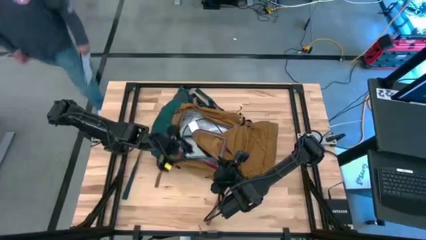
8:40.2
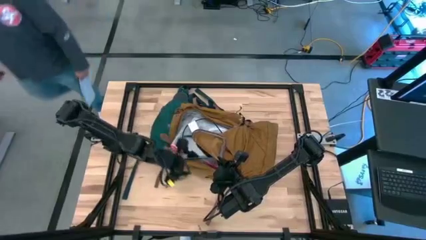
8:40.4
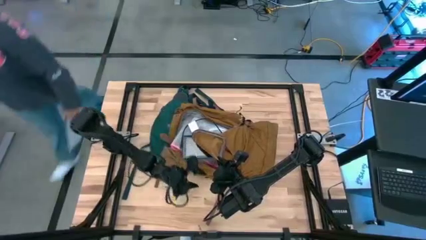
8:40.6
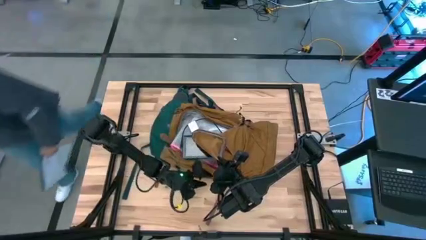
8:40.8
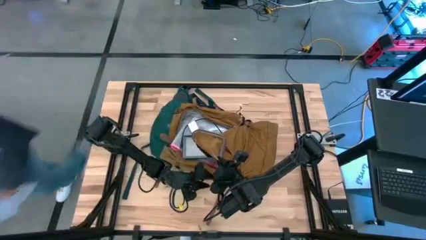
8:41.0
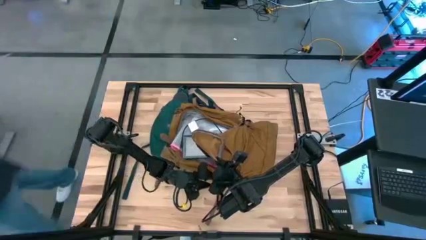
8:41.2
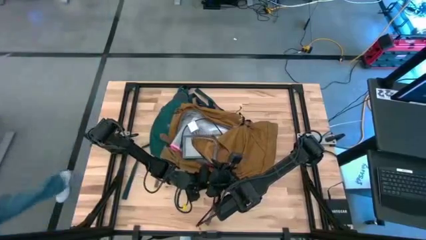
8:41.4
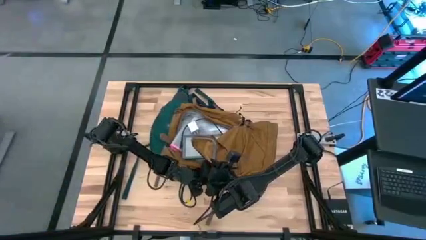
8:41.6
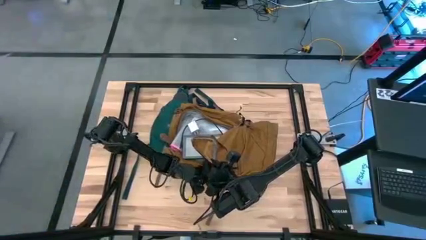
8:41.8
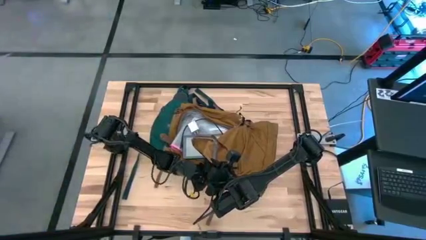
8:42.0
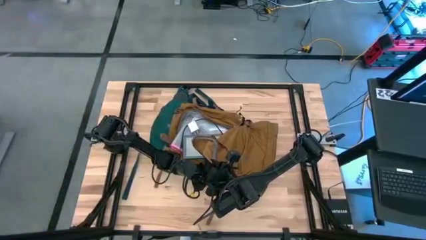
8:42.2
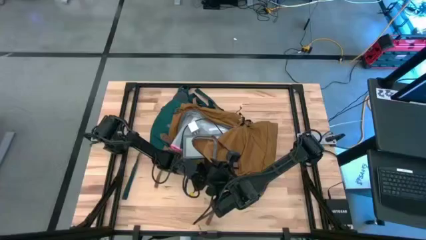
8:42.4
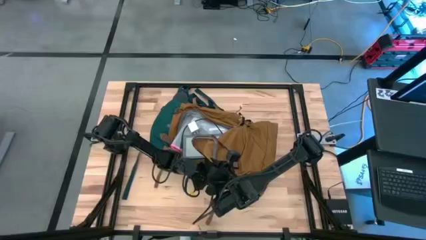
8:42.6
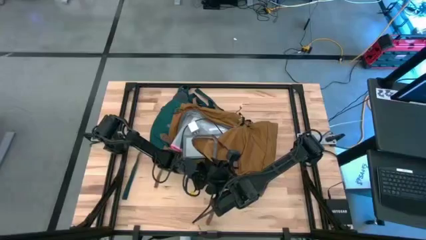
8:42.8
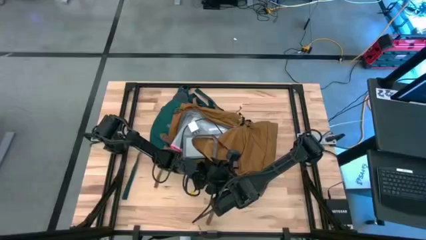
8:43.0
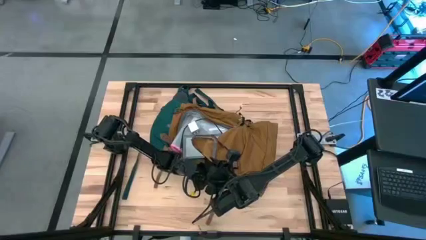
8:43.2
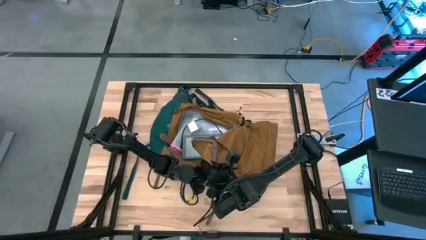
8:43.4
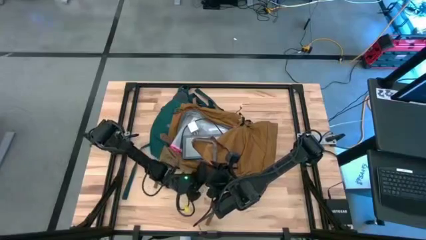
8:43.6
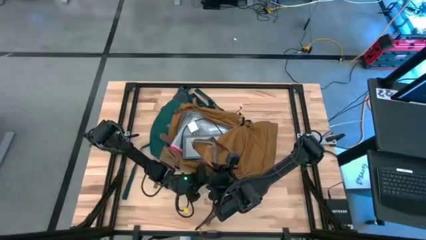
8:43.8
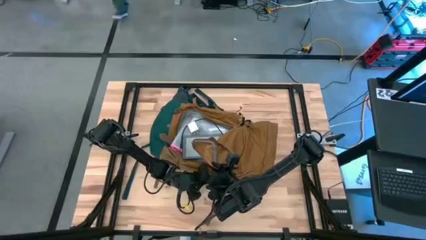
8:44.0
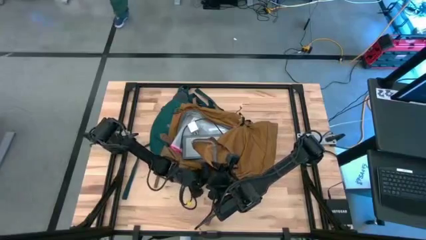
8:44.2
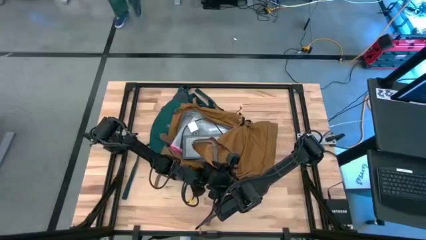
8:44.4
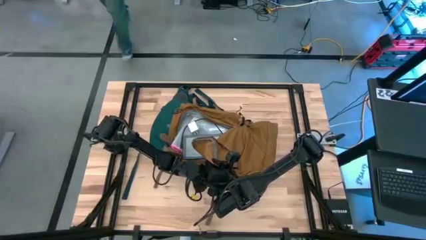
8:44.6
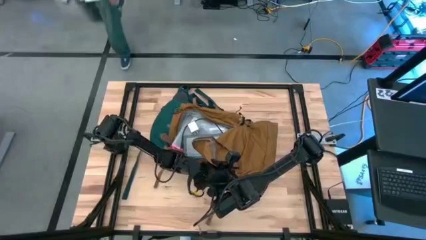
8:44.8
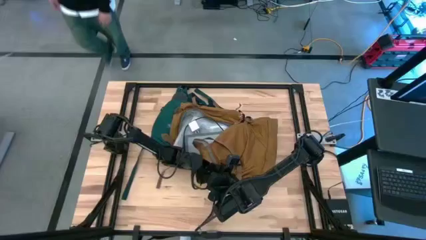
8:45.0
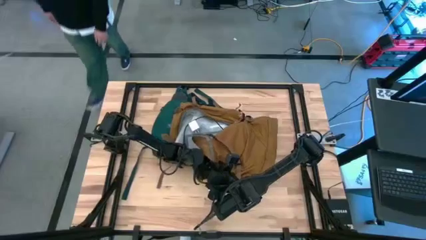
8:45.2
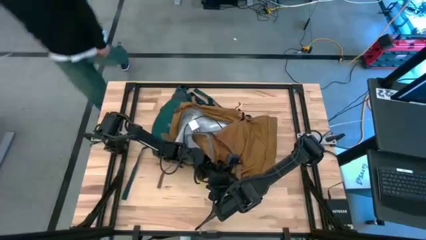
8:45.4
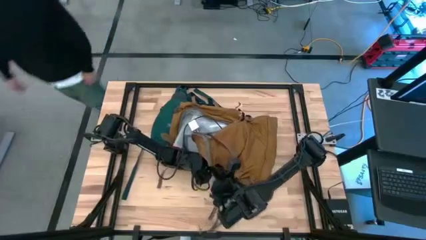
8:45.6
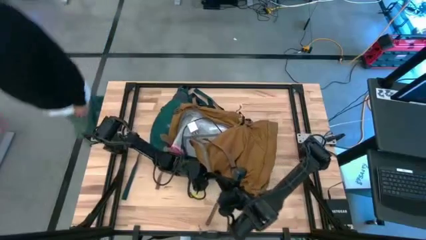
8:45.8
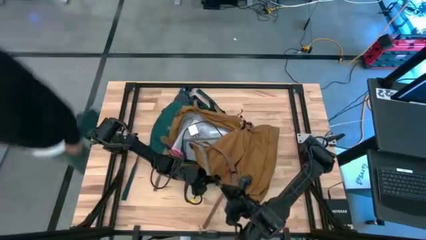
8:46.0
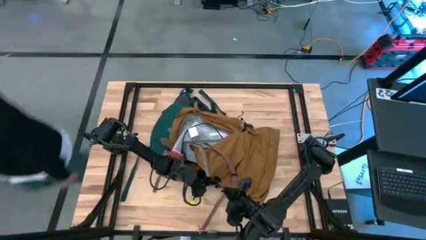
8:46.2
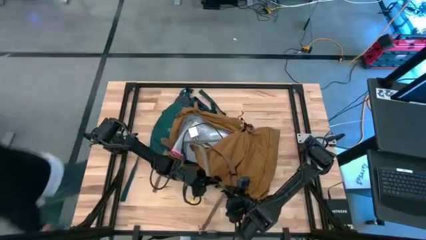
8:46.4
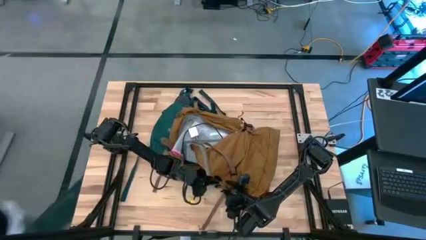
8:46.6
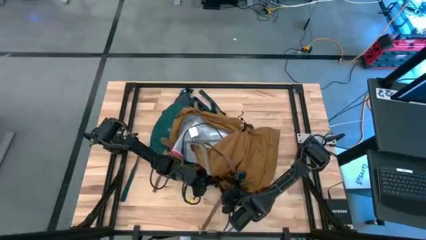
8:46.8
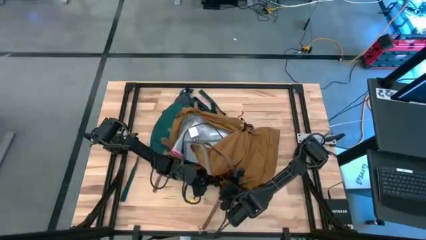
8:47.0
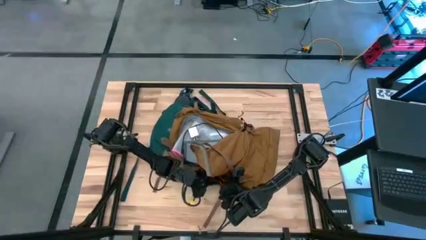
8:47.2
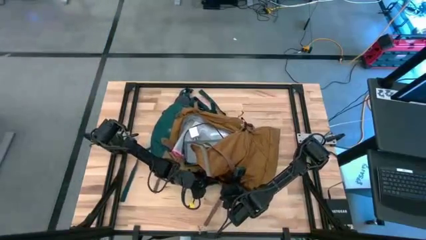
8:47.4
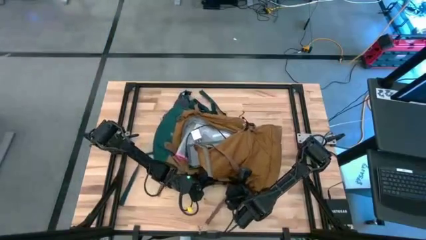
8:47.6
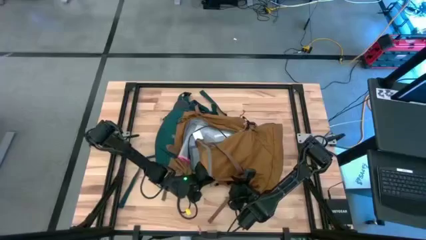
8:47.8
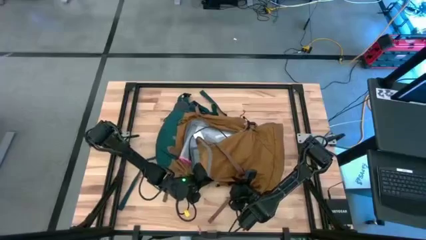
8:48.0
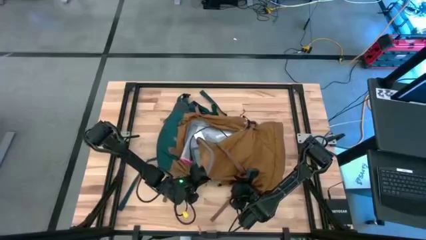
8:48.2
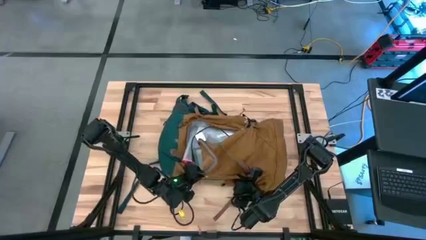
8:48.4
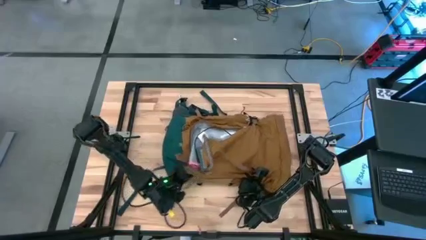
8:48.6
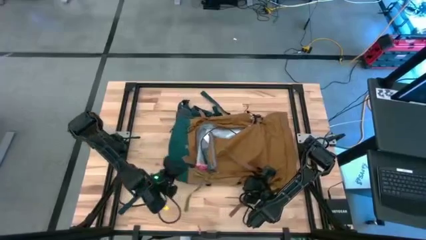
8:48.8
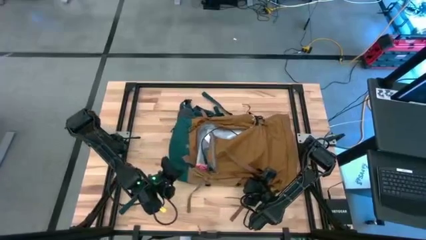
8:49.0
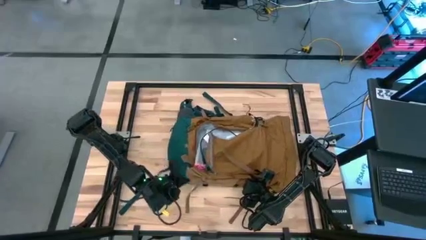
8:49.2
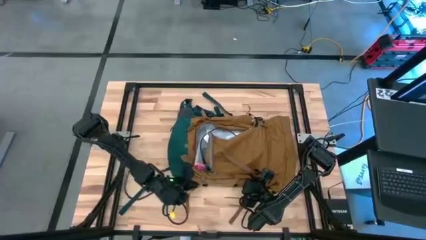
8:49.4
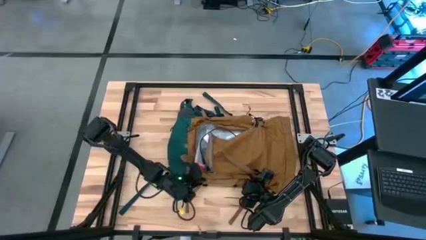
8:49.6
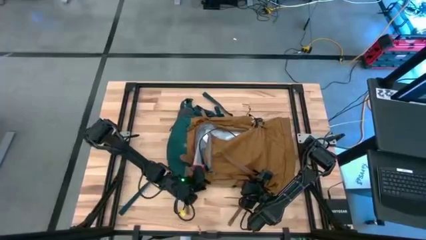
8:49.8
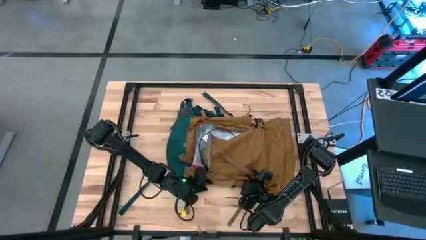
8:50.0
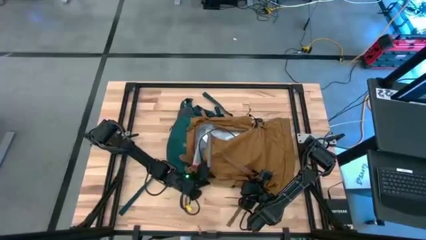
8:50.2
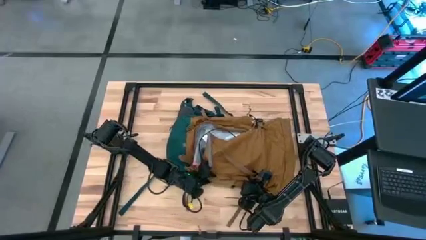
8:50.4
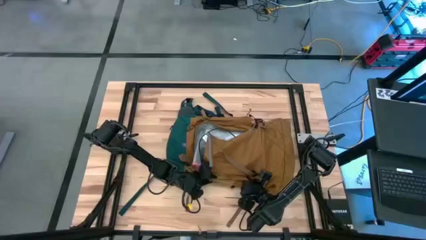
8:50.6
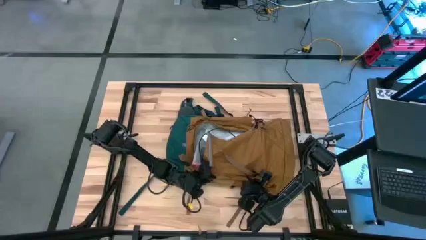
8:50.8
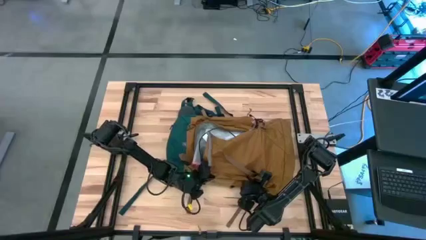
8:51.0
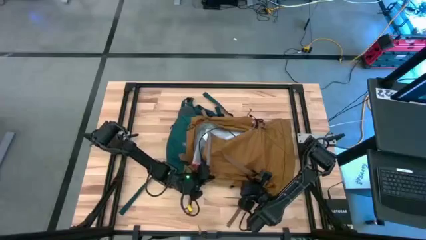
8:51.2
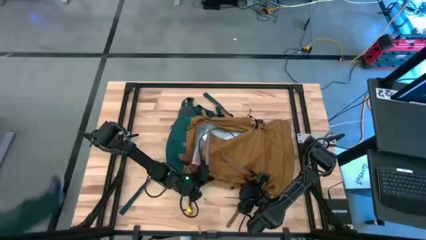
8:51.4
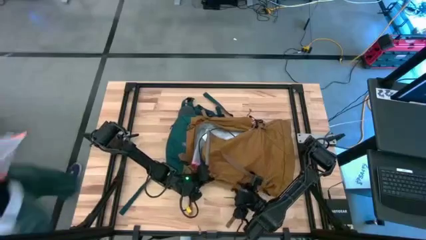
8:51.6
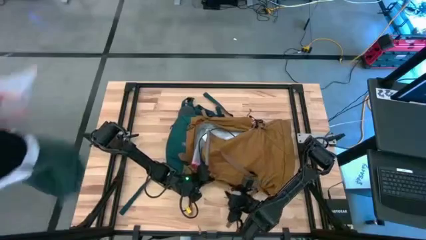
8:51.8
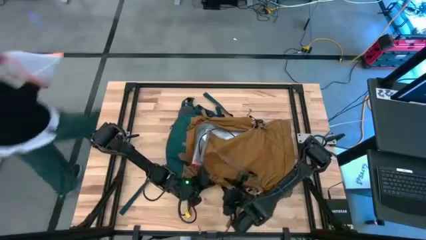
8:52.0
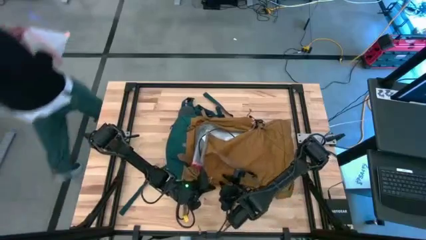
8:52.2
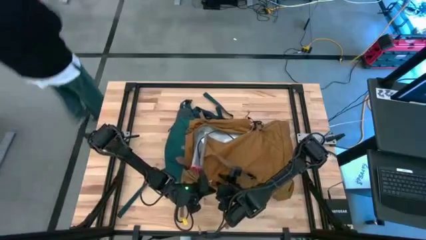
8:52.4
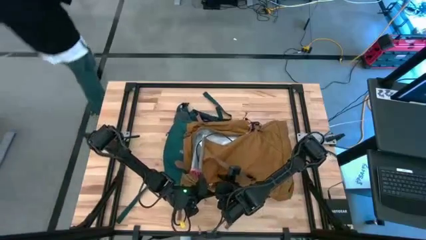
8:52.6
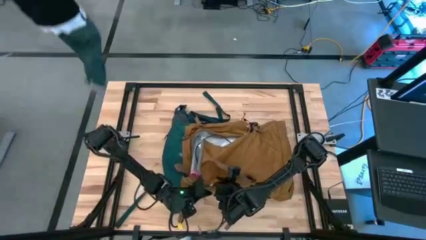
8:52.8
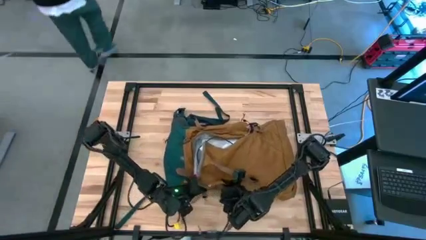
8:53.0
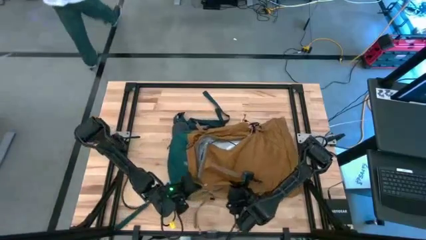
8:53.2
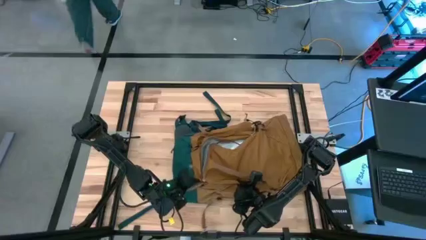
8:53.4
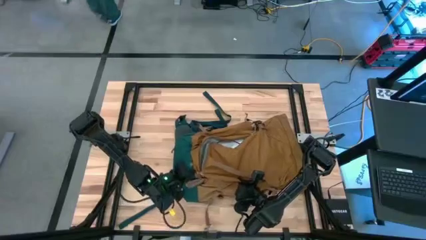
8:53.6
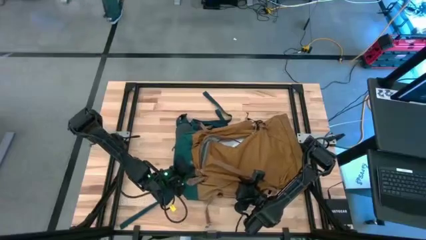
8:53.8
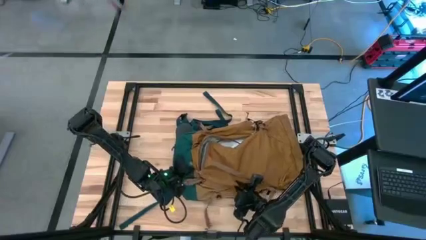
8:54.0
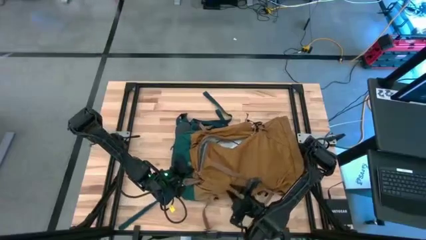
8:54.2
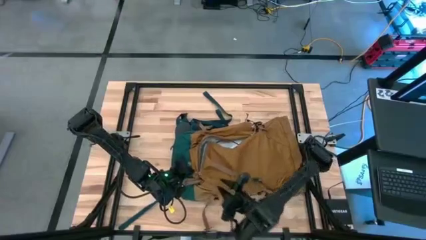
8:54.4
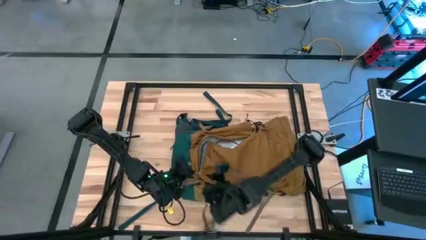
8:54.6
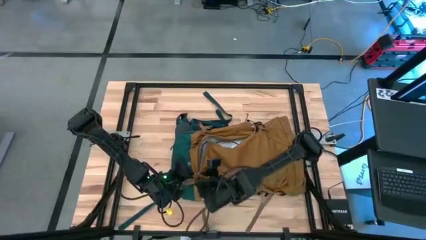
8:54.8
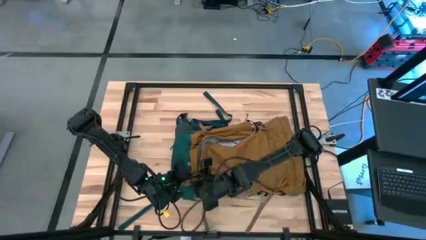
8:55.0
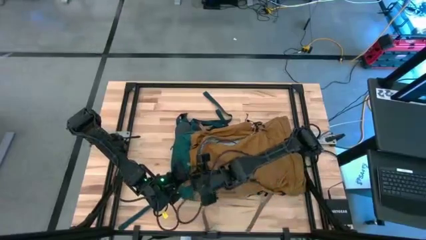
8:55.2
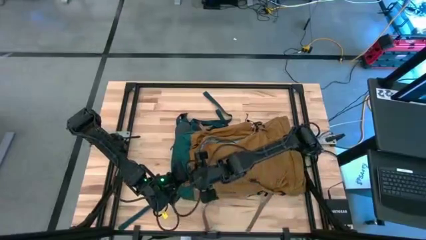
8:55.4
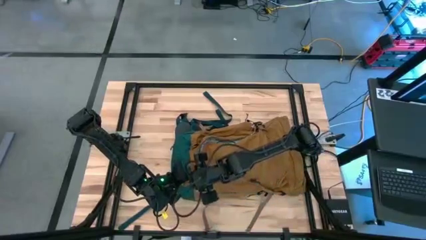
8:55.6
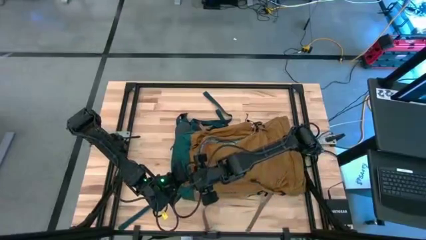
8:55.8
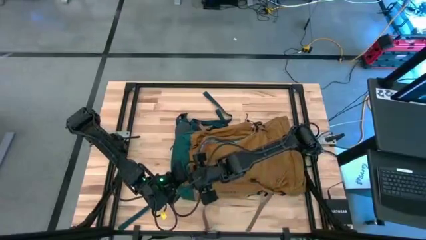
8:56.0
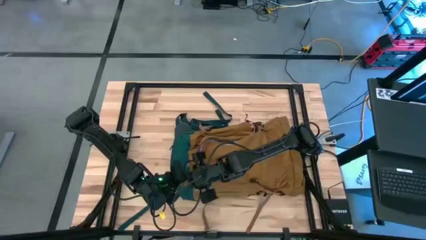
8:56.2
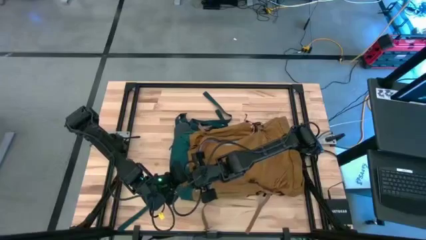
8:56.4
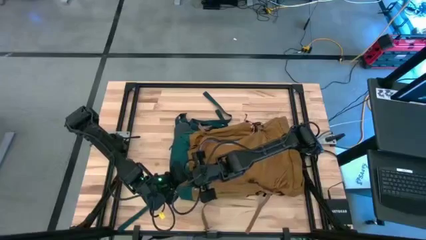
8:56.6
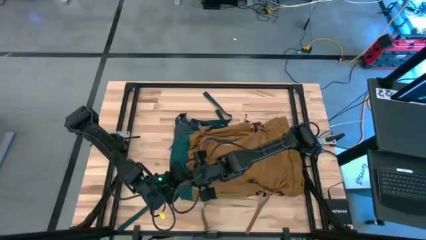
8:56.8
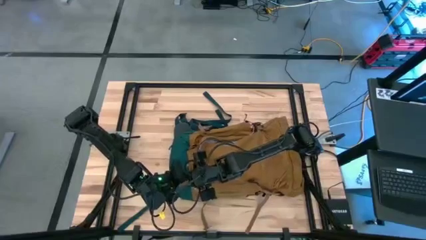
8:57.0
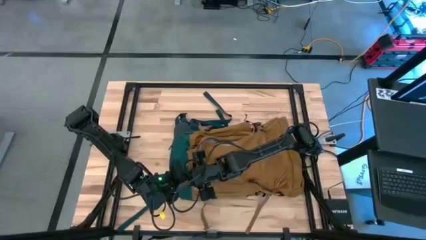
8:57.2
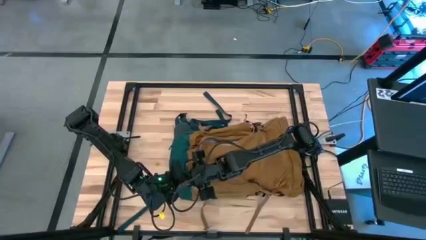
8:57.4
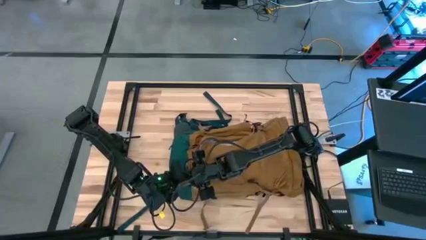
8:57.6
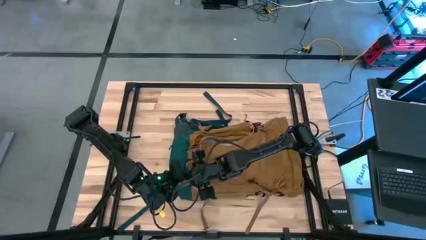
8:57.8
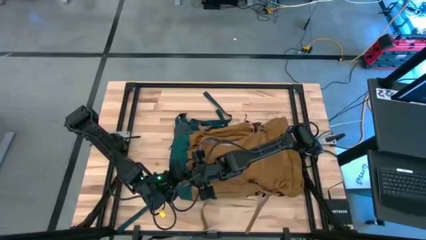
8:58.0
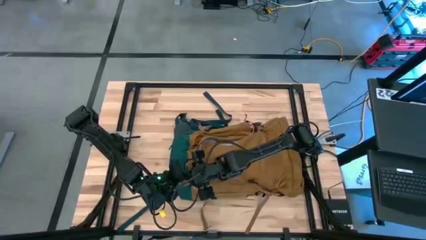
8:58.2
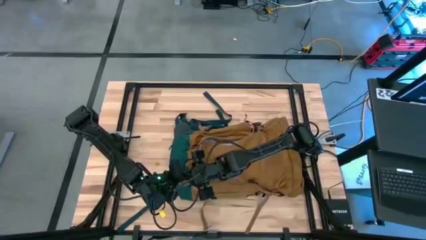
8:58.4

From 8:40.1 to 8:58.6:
Task: Unpack backpack
Close the brown backpack
